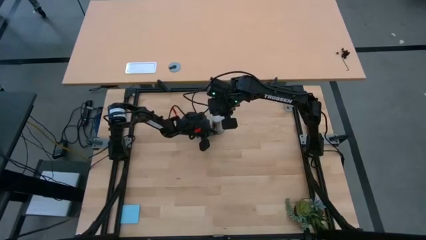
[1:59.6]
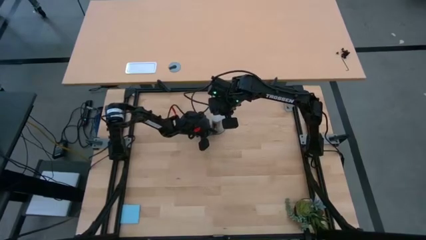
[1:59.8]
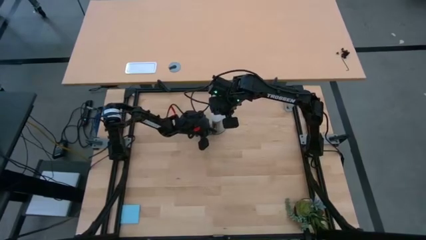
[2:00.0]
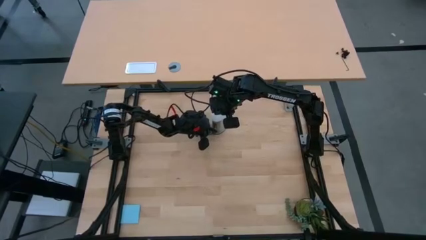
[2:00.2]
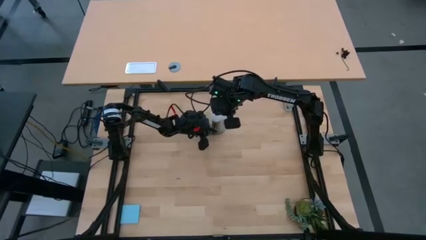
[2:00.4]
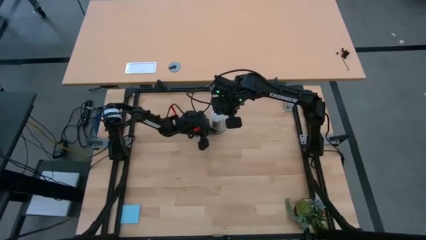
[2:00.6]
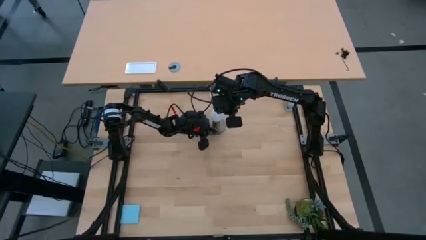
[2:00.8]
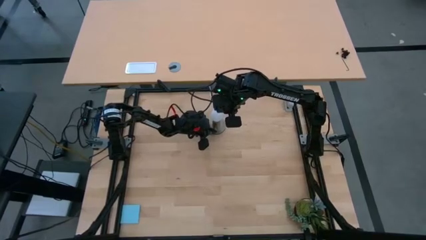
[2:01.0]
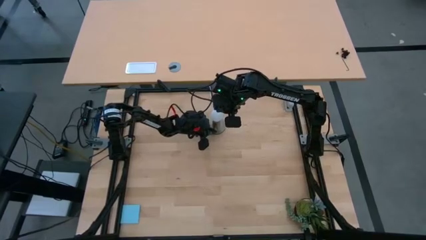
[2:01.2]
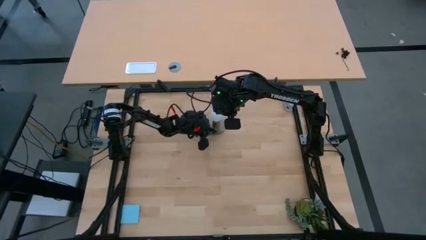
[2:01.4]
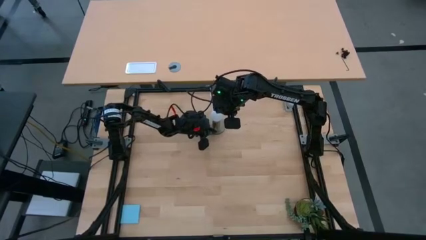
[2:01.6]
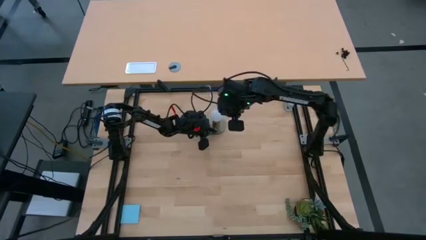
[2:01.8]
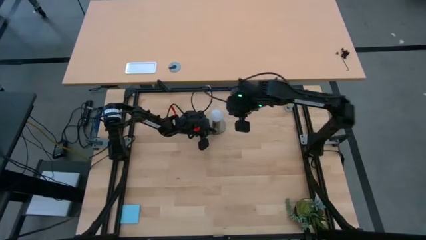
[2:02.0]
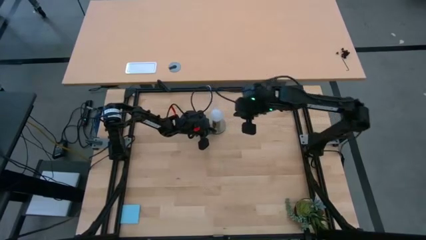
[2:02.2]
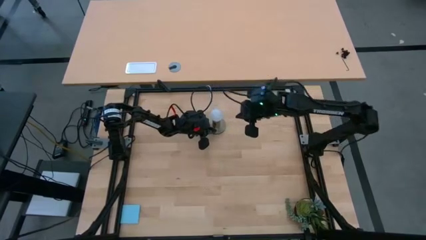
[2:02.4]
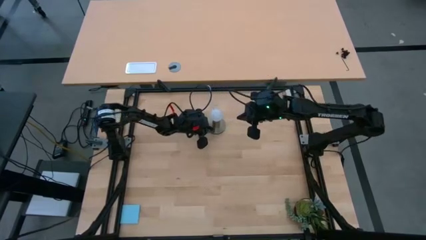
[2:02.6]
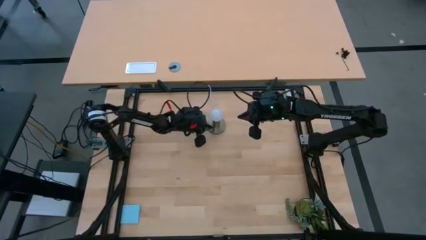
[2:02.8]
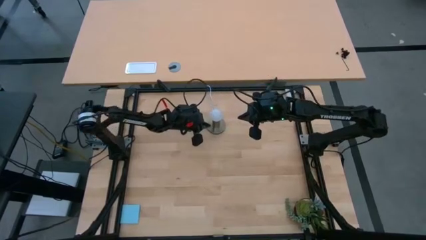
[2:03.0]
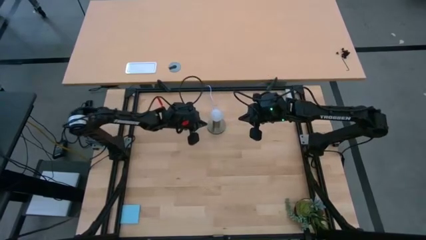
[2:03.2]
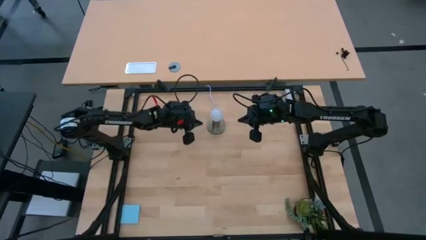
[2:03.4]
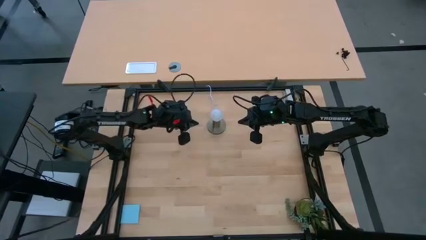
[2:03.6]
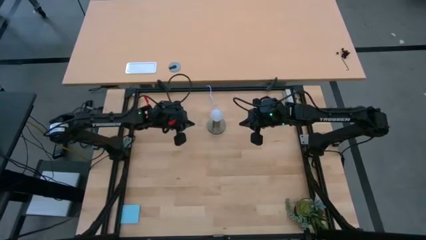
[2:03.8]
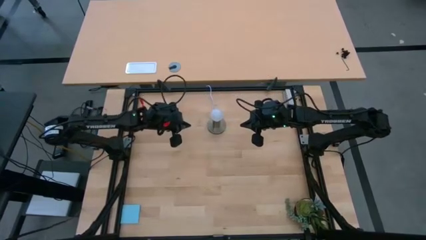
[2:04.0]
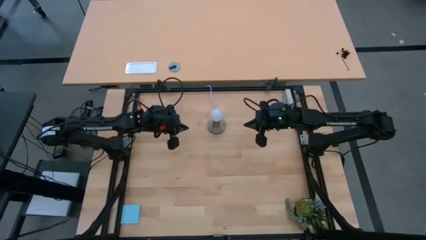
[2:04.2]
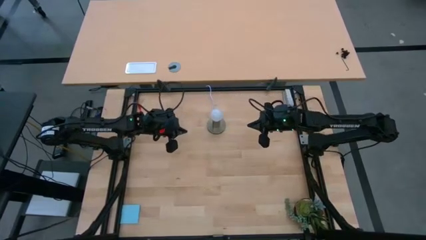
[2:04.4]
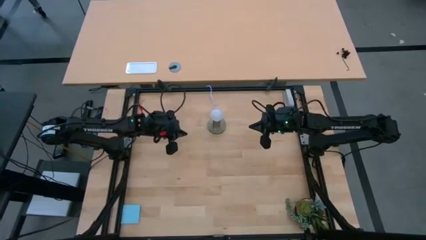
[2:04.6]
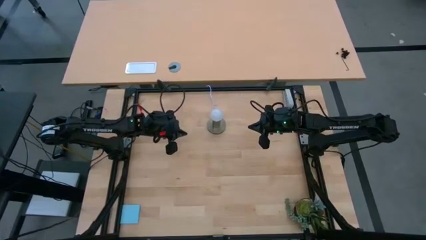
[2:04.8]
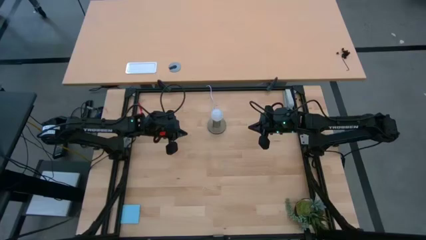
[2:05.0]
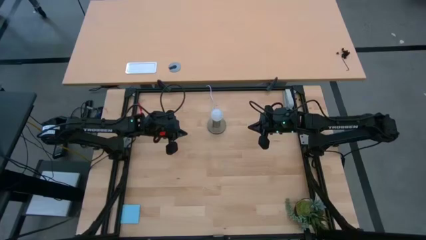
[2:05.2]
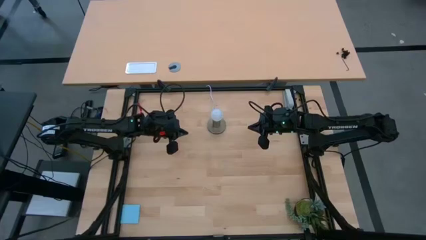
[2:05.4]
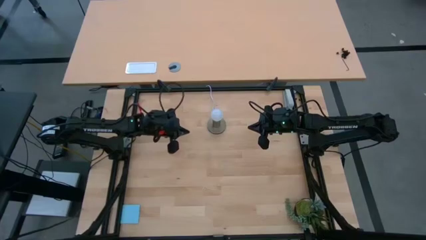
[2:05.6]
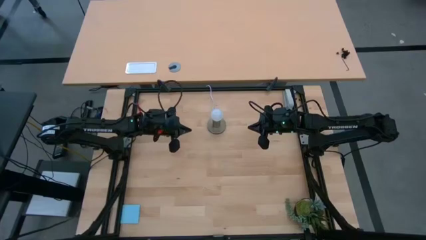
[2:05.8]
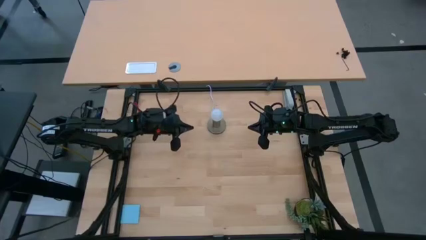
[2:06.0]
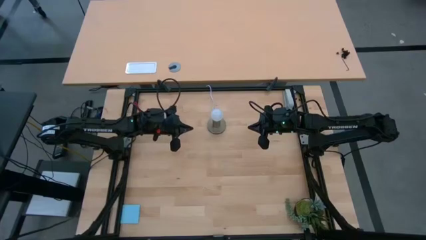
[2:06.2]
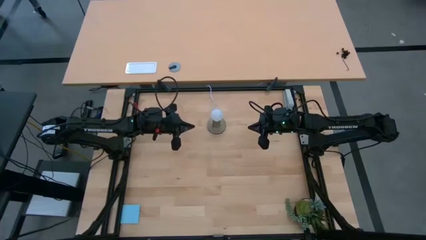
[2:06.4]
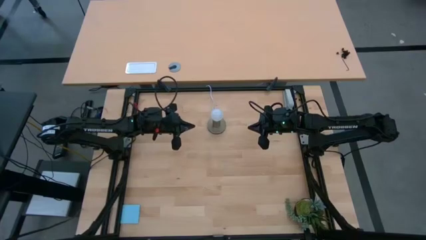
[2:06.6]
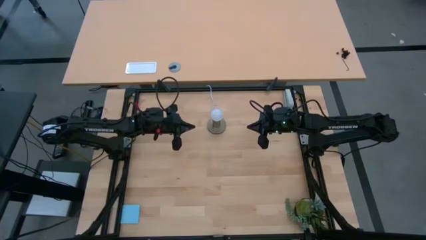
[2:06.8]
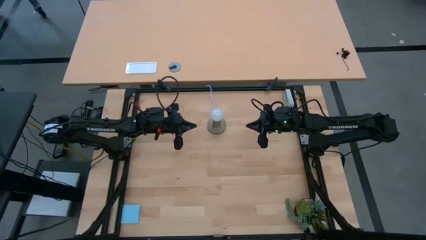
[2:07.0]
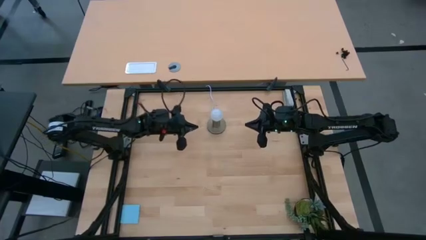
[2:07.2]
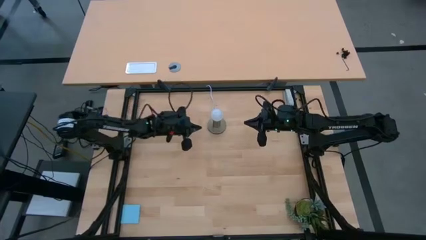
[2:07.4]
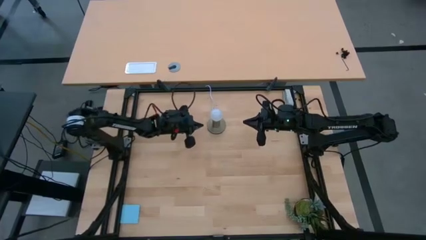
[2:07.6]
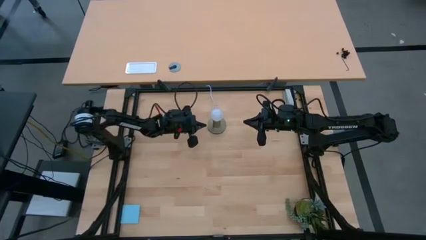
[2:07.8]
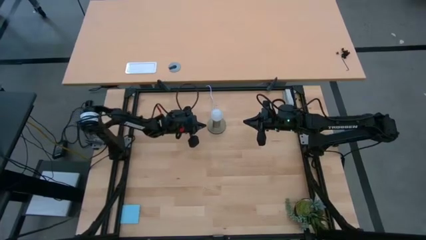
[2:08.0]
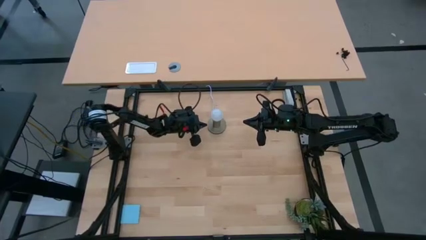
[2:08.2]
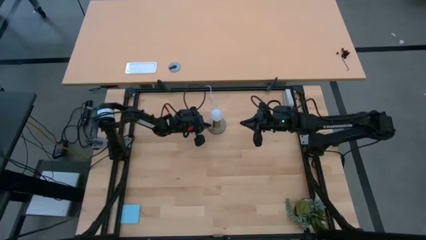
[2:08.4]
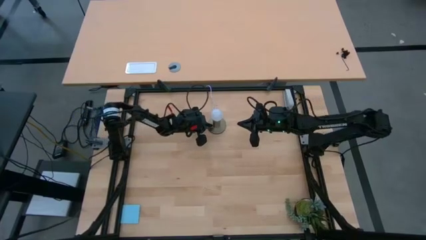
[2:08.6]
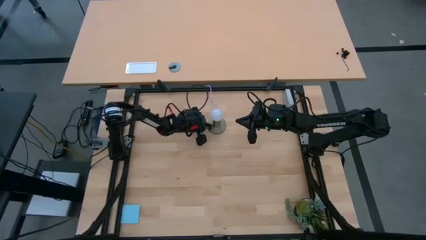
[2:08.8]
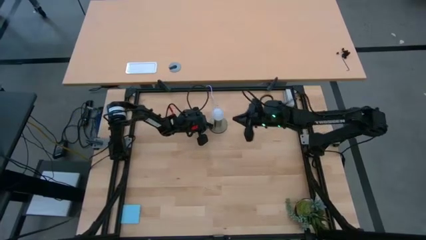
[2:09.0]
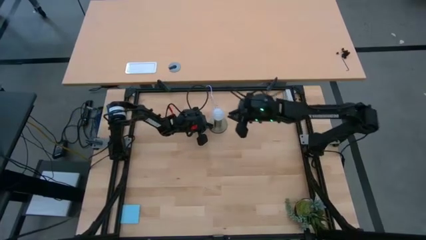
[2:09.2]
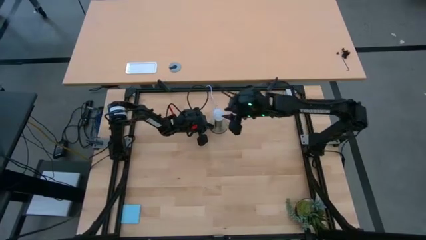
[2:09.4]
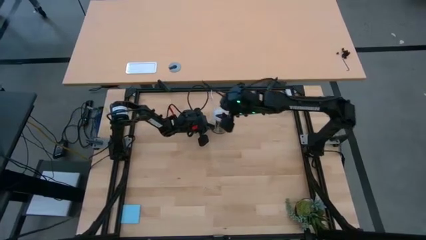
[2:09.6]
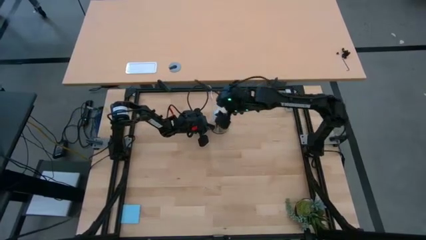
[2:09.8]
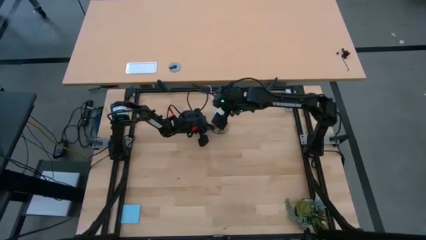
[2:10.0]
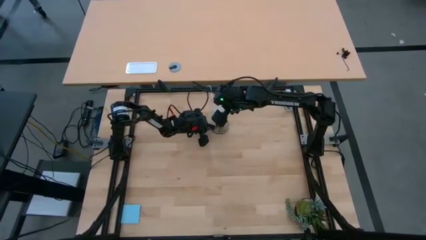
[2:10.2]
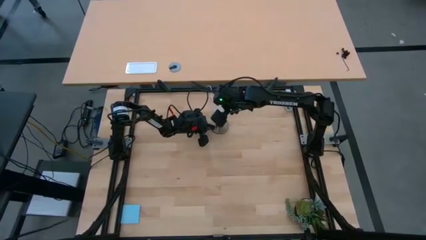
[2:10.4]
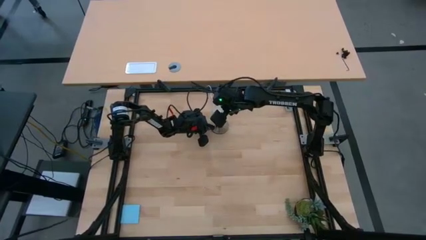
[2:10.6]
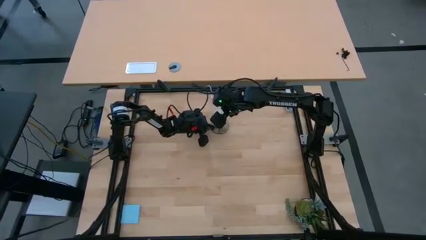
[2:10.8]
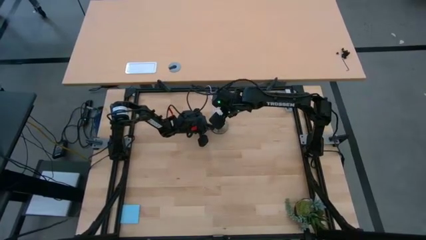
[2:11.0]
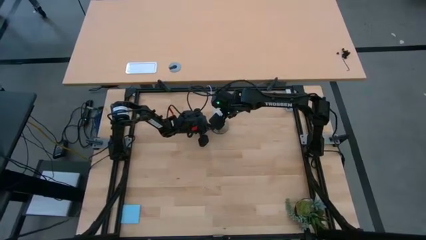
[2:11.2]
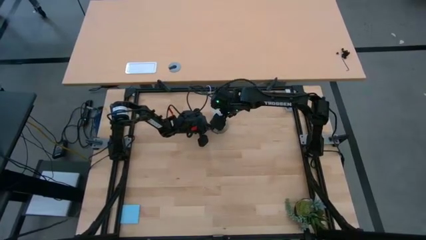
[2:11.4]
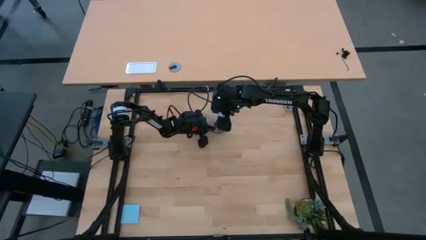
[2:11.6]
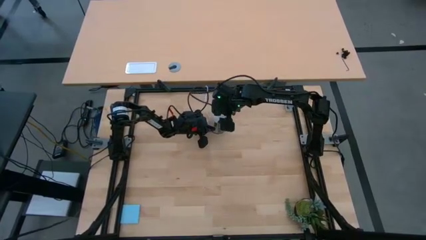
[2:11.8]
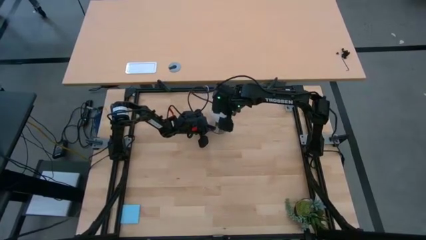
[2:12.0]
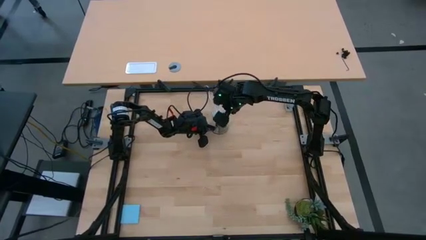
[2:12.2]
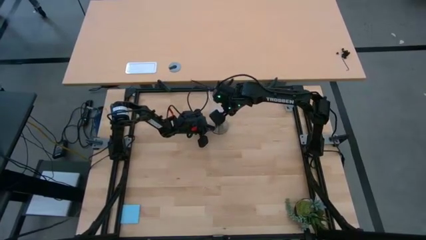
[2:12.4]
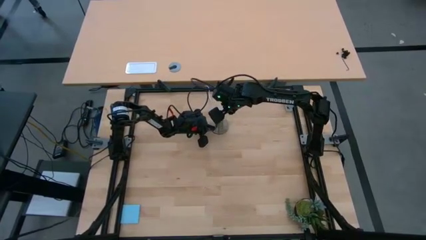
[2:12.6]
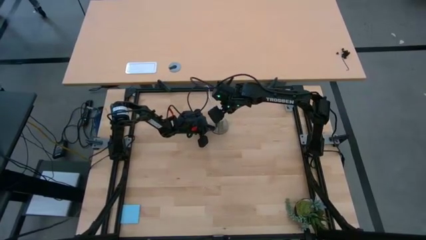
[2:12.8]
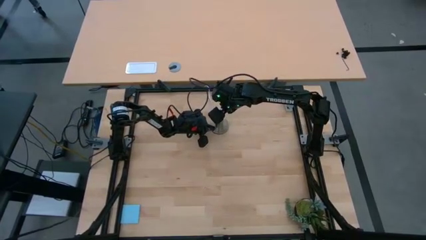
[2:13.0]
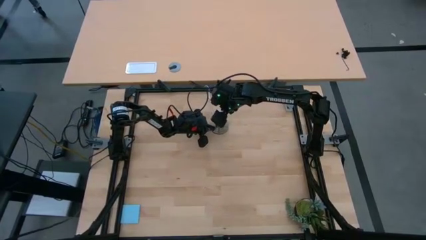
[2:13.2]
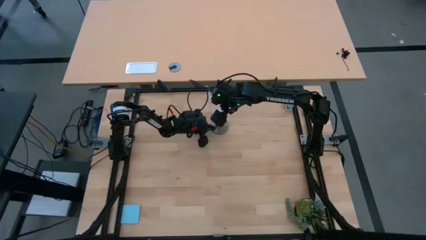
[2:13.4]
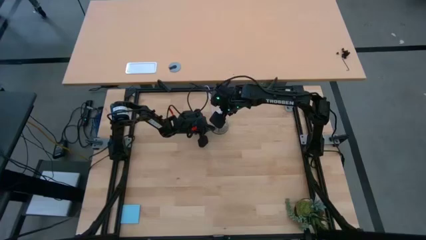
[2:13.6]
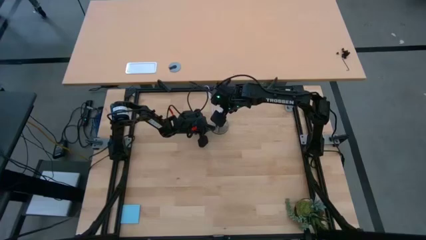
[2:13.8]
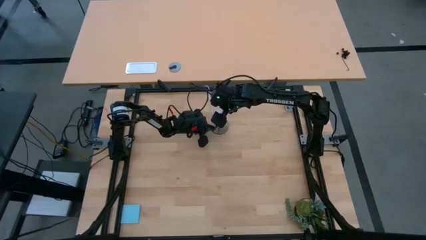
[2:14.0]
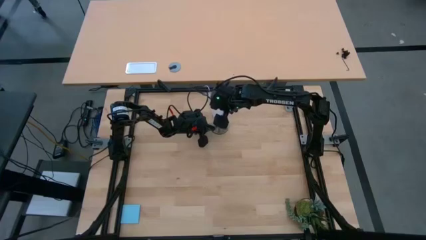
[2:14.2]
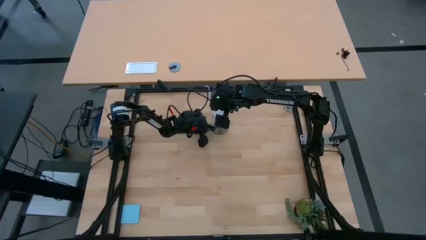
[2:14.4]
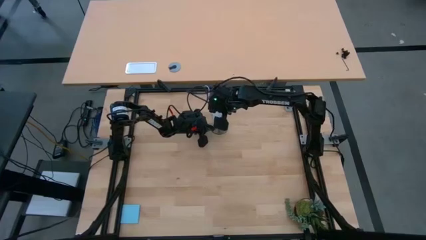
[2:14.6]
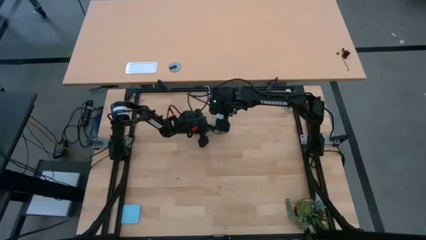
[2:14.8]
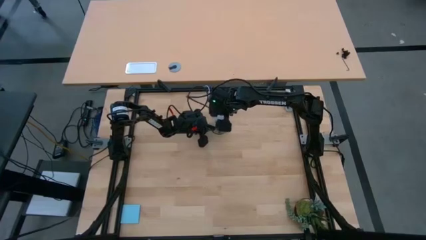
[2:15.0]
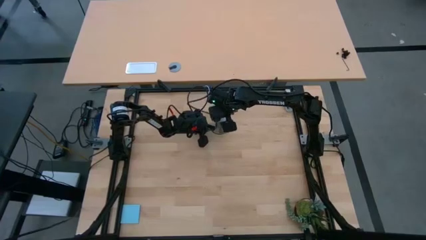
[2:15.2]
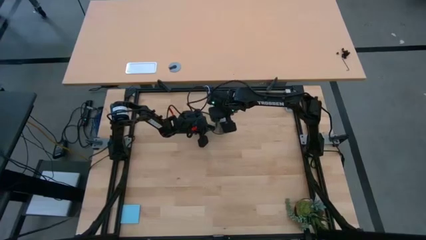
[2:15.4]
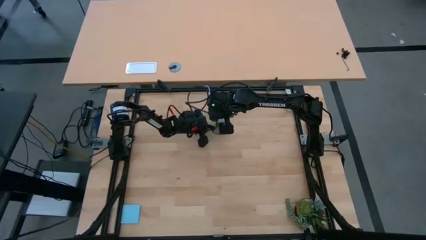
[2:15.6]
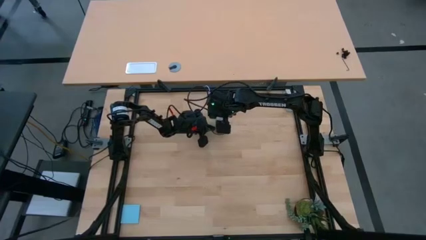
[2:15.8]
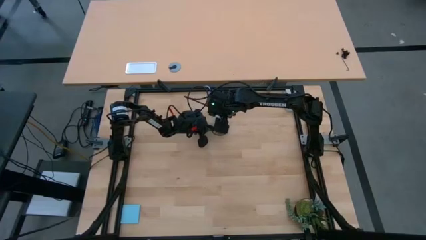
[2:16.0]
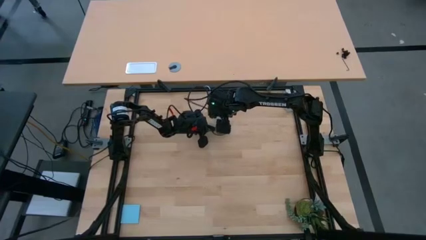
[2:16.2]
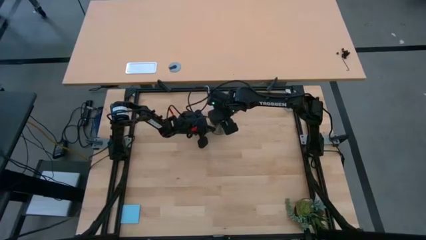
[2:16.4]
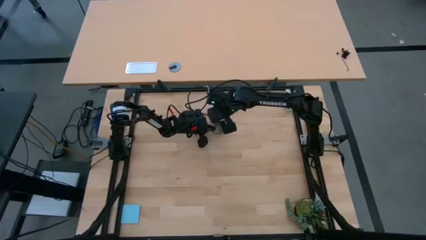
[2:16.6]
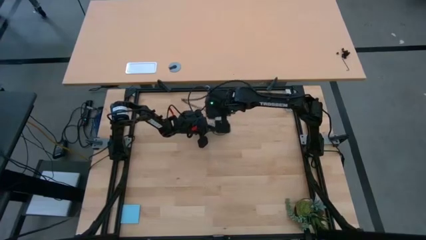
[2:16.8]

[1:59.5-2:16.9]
Task: Screw lightbulb
Remove the light bulb from the table lamp holder
